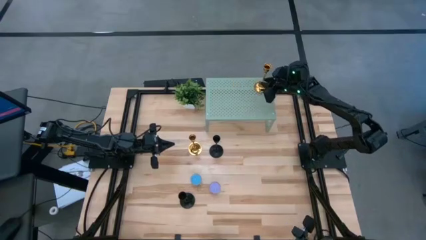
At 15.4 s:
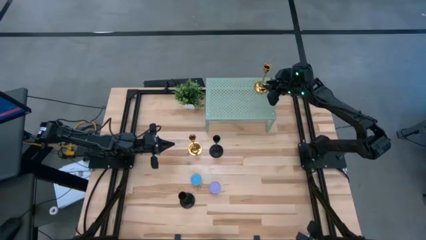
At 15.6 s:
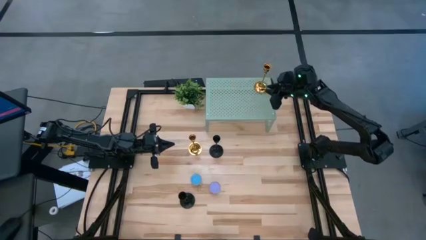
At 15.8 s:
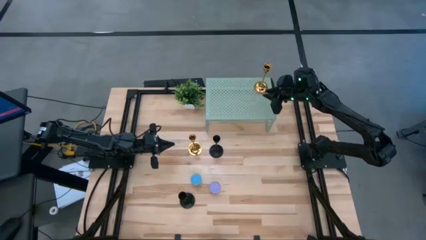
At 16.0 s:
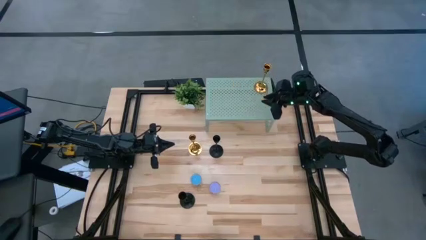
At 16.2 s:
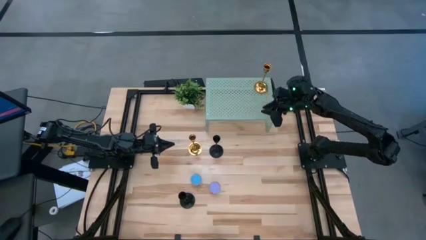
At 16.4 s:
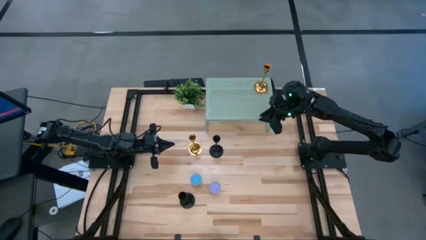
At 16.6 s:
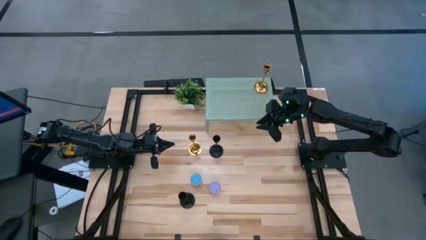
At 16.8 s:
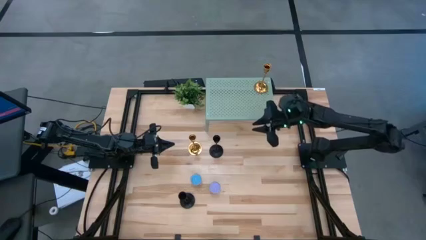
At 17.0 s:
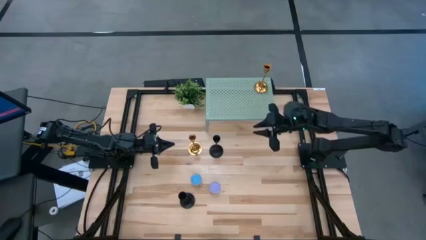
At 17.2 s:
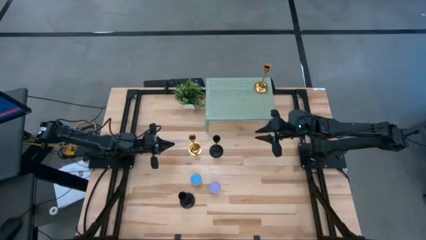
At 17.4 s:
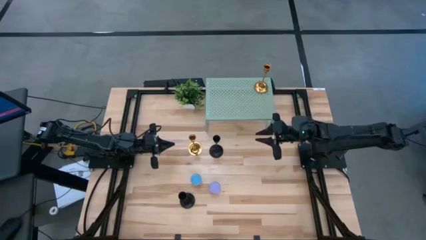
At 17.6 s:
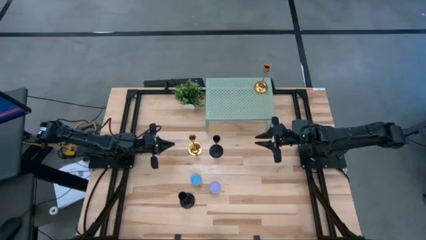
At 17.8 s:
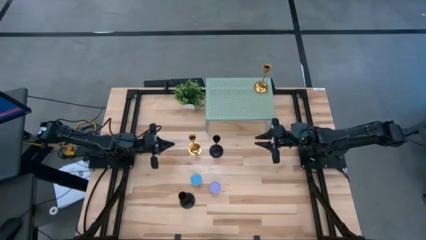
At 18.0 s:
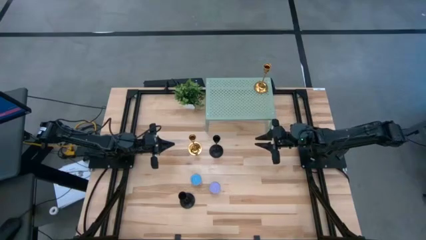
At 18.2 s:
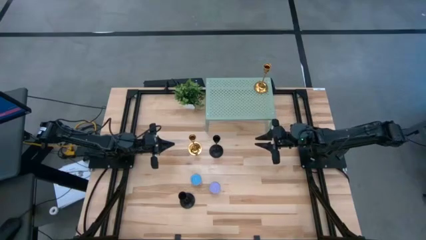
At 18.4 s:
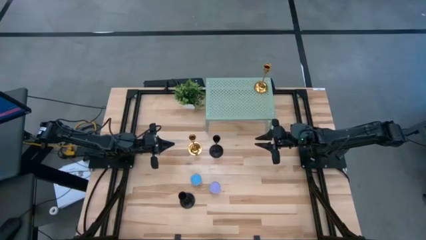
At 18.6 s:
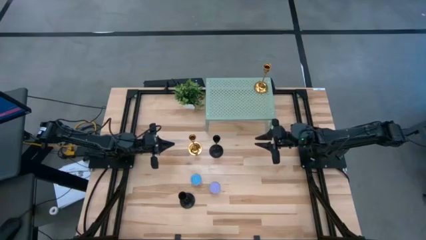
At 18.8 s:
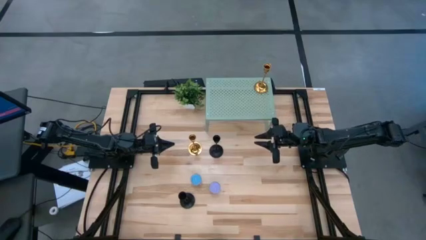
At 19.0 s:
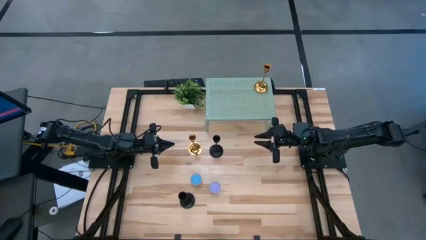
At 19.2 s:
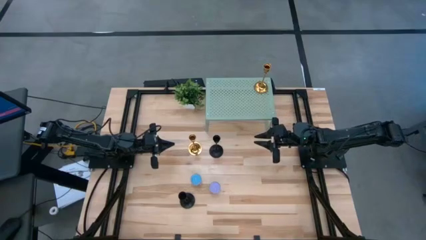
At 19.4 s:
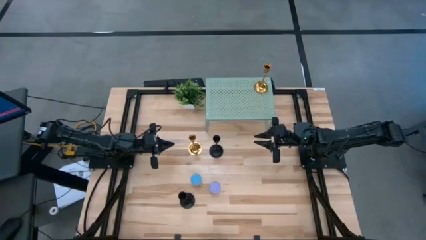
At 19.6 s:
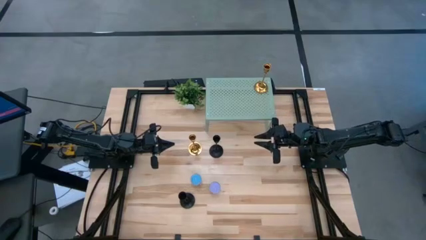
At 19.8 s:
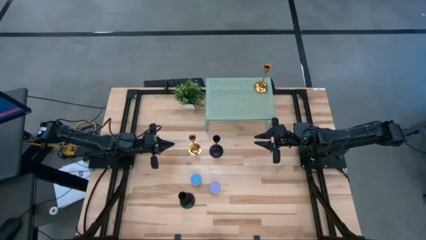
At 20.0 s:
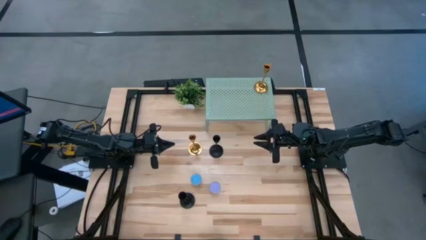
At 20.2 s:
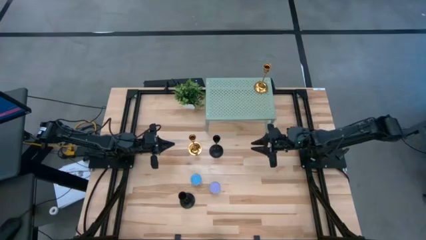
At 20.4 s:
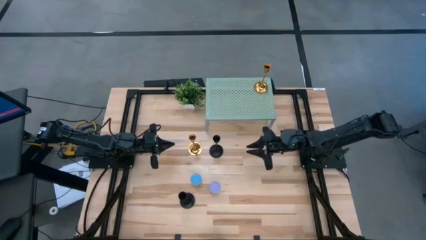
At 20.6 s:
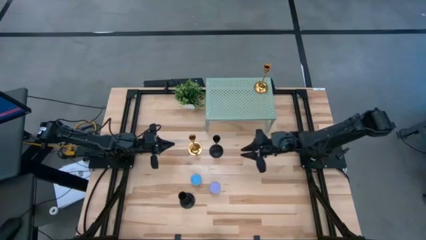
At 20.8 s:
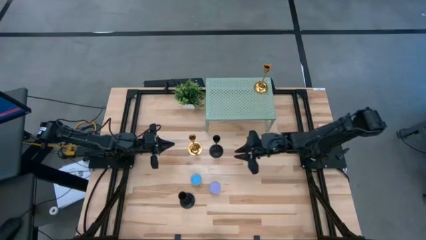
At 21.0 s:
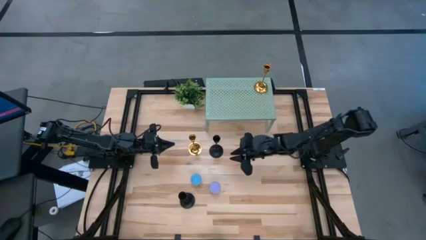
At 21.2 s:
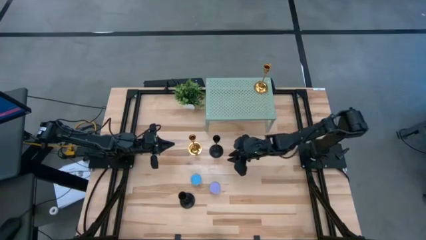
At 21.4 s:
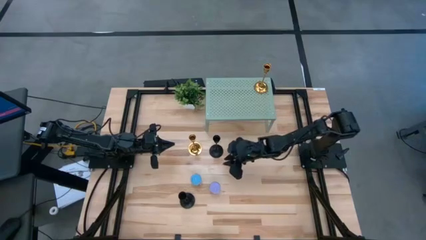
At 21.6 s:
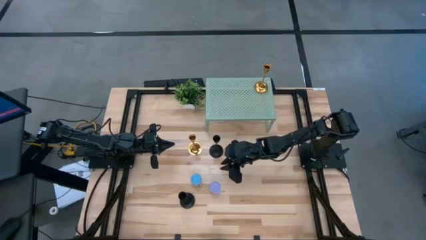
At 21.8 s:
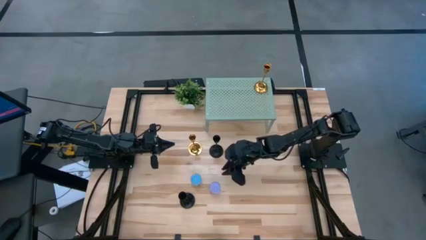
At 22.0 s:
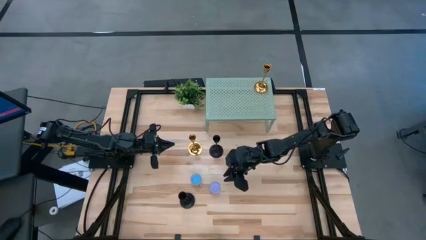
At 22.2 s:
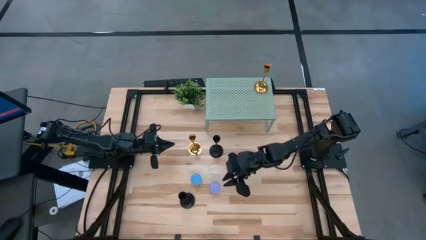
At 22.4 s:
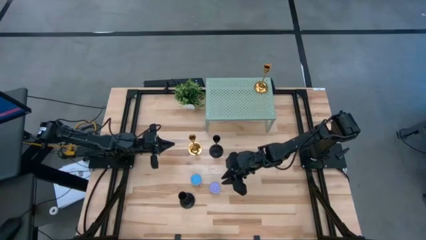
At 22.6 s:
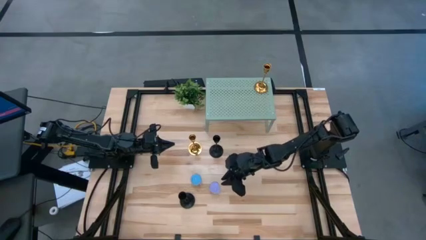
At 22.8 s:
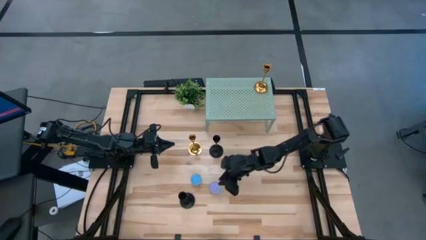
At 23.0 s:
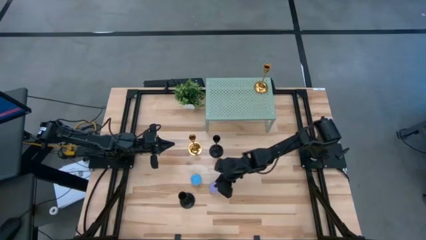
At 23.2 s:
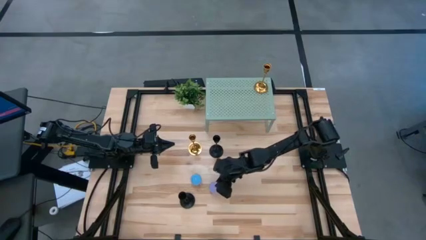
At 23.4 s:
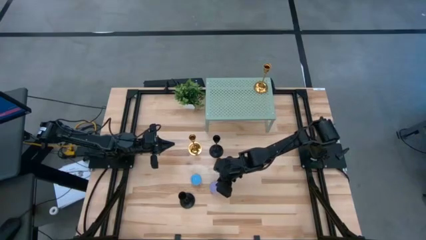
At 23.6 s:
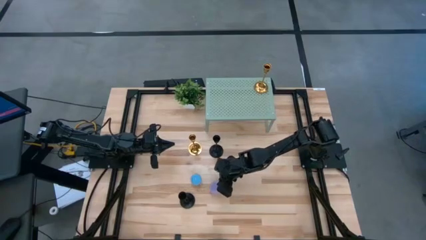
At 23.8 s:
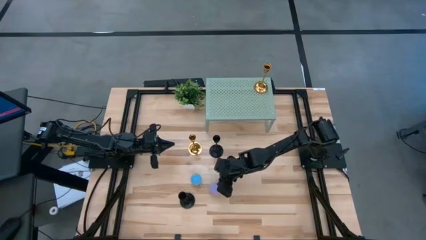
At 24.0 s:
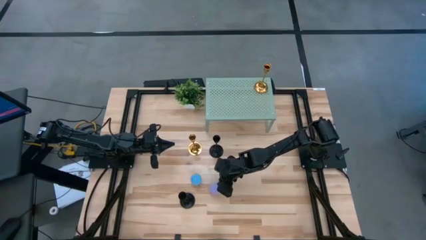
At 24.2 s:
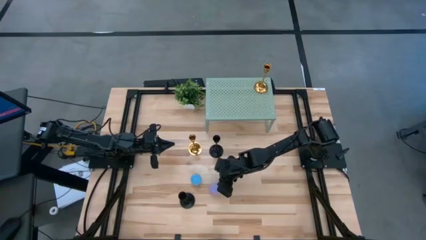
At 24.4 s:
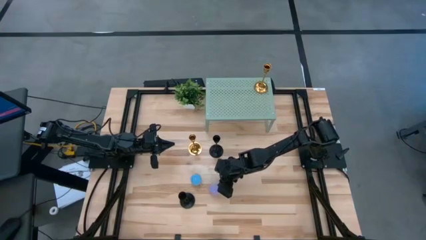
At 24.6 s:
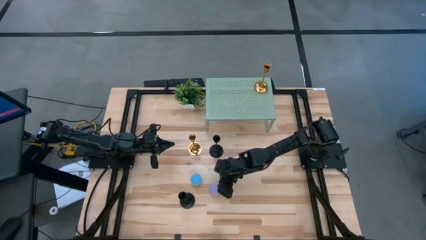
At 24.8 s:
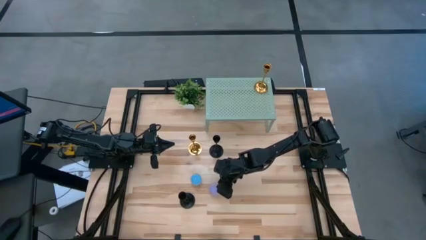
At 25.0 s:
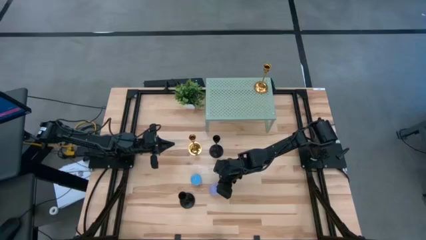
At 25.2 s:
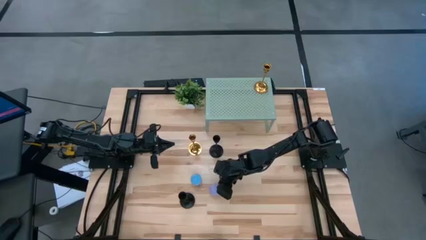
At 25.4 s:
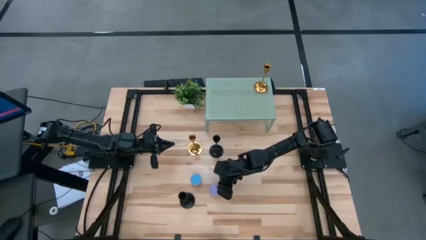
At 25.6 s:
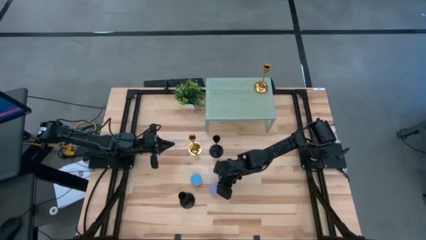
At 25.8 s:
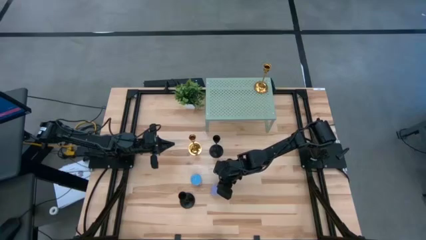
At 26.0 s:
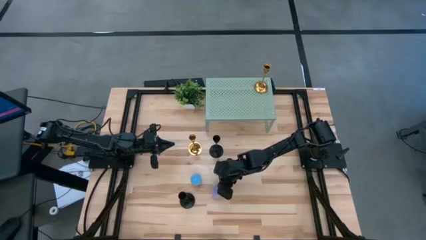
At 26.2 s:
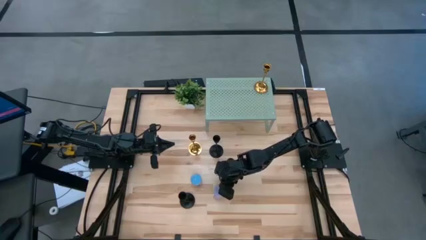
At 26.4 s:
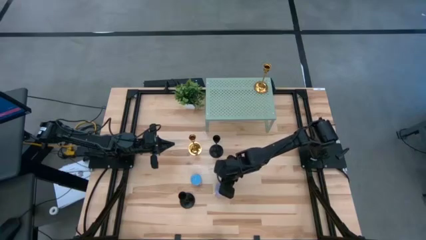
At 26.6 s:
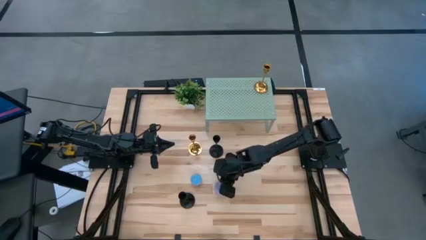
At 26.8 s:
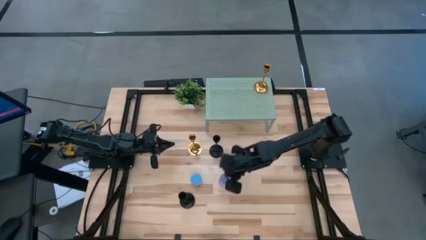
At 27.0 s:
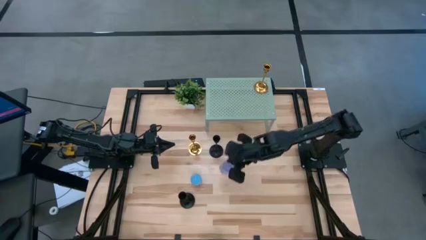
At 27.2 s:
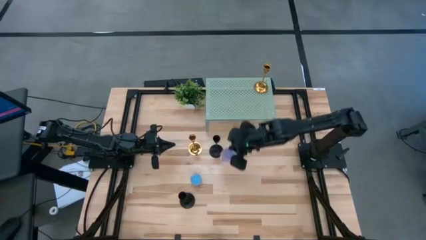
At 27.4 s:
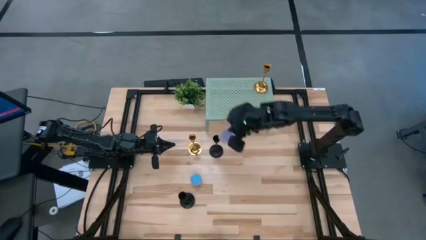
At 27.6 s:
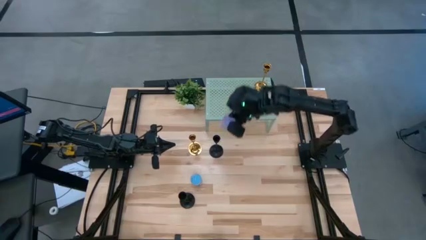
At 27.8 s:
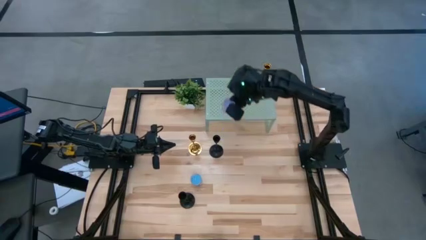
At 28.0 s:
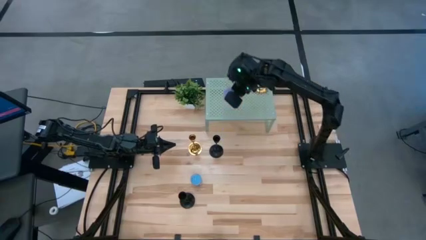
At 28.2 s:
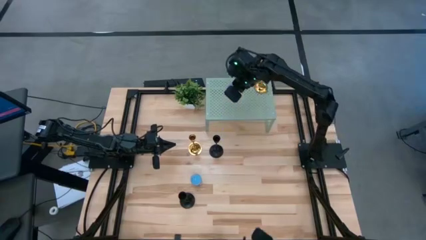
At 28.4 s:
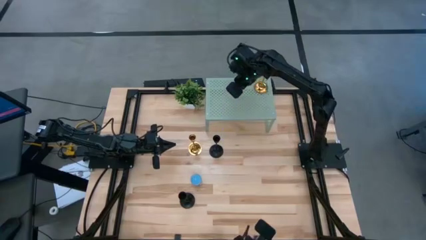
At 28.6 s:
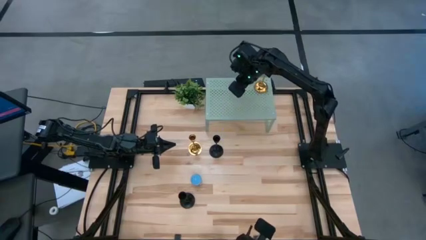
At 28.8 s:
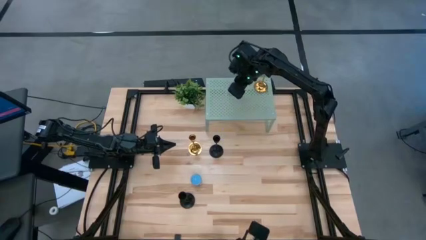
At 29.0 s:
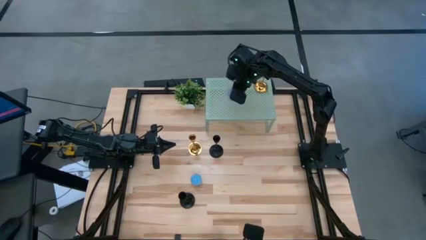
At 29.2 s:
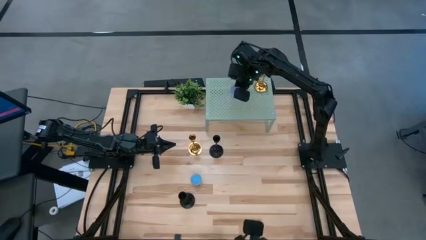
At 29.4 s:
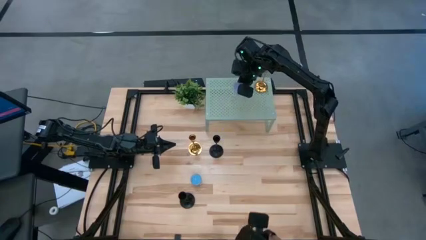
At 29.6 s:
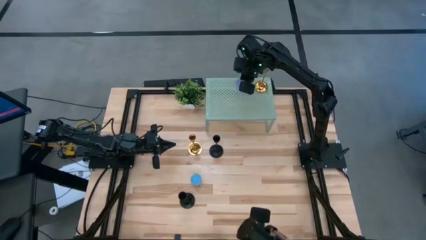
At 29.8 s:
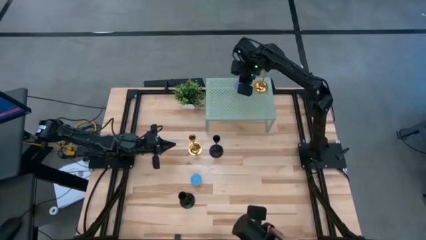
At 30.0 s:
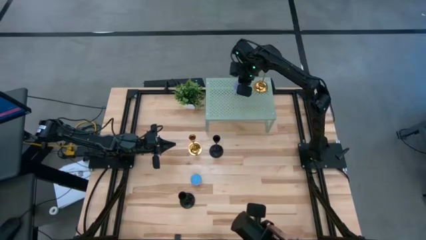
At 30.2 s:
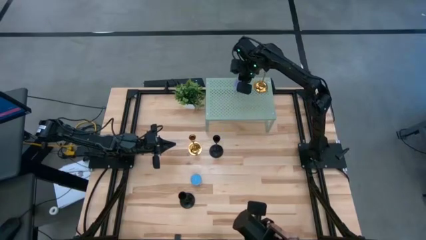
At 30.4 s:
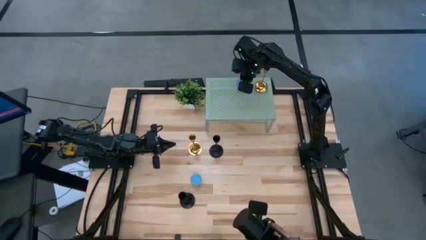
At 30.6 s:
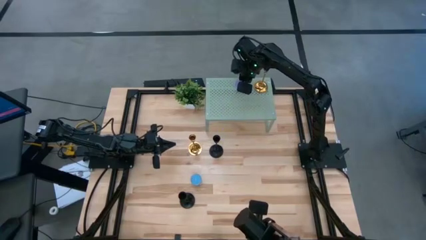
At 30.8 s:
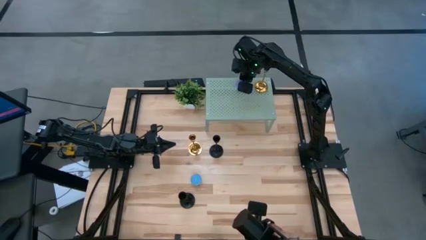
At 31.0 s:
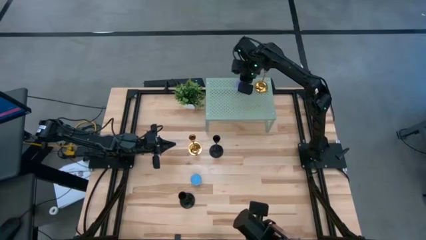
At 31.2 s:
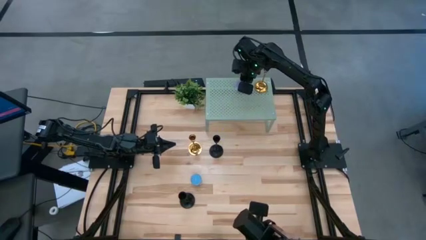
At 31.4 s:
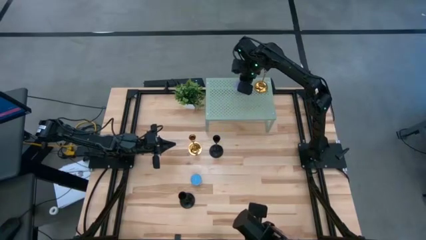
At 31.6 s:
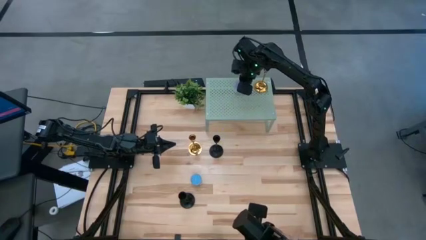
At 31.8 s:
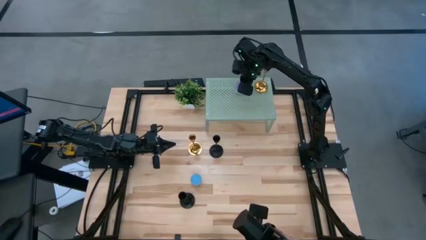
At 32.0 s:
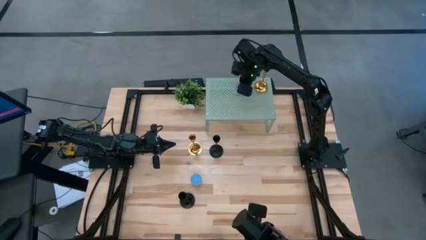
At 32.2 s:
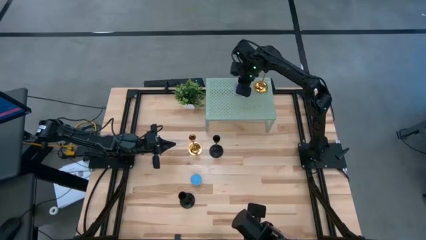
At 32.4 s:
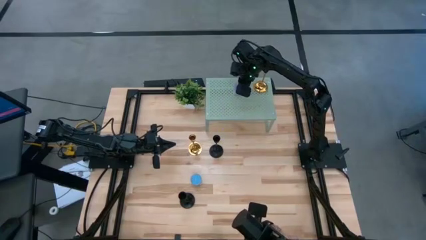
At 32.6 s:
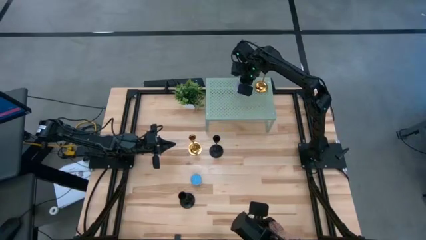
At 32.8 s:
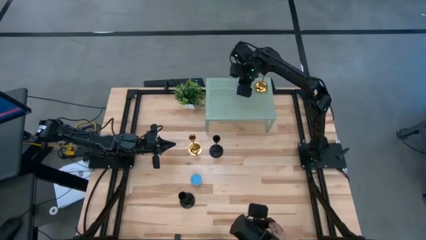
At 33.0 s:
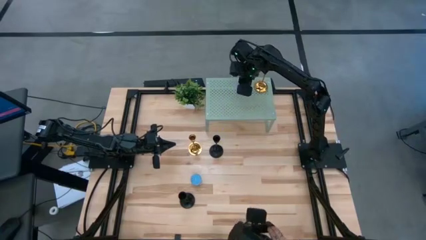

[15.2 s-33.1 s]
Task: Pick & Place candle stick holders
Put the violet scented candle on the shelf
